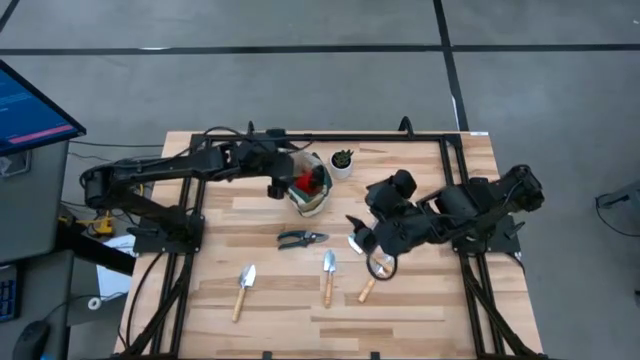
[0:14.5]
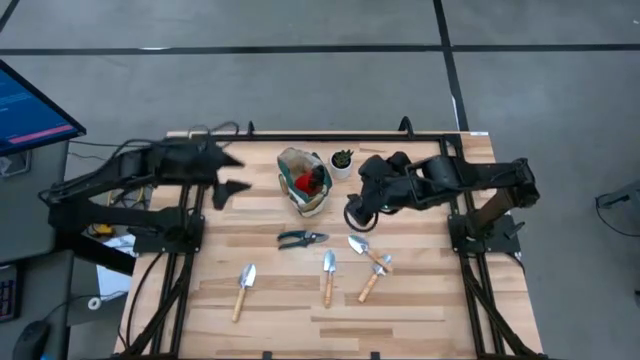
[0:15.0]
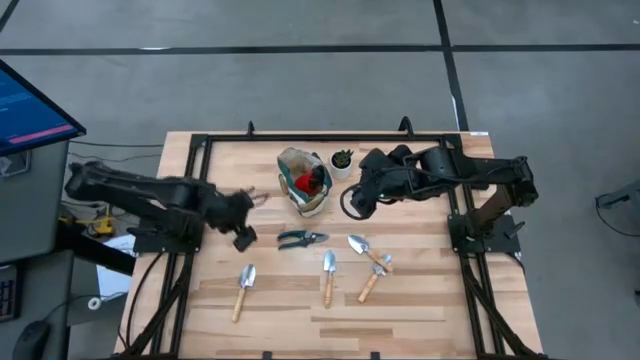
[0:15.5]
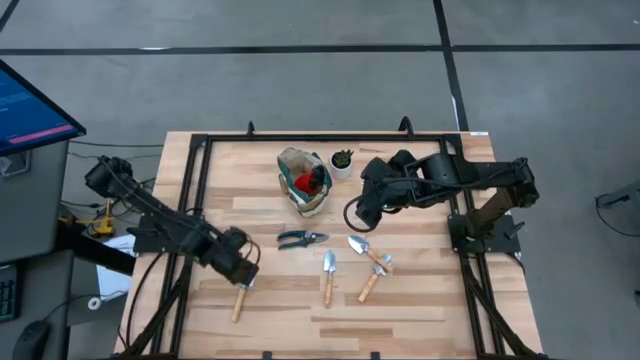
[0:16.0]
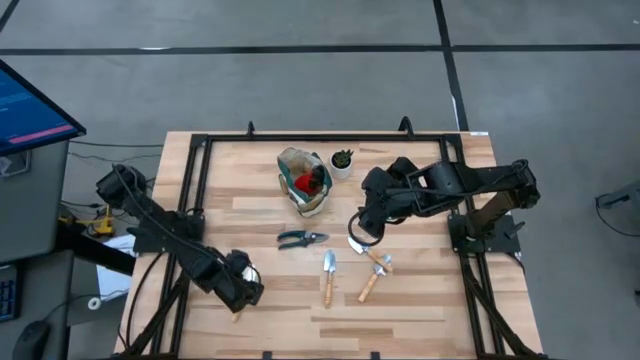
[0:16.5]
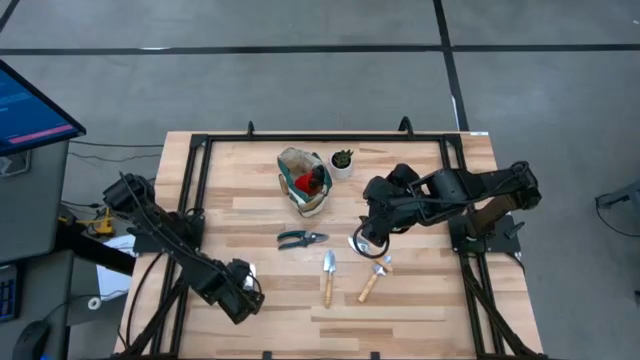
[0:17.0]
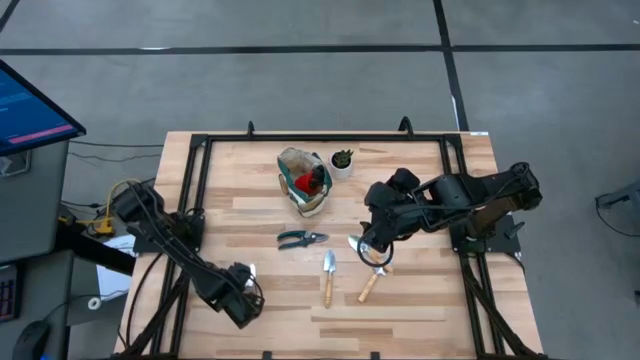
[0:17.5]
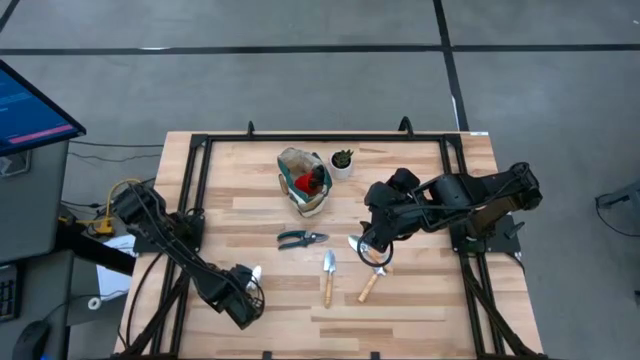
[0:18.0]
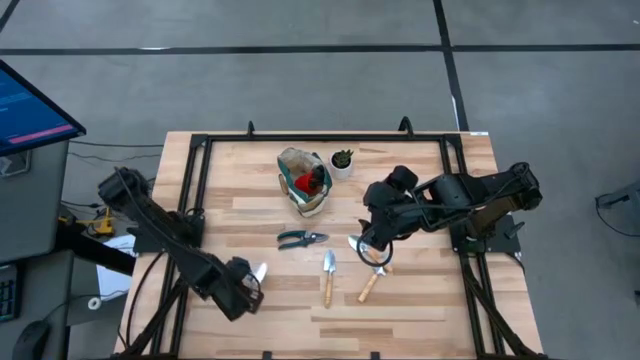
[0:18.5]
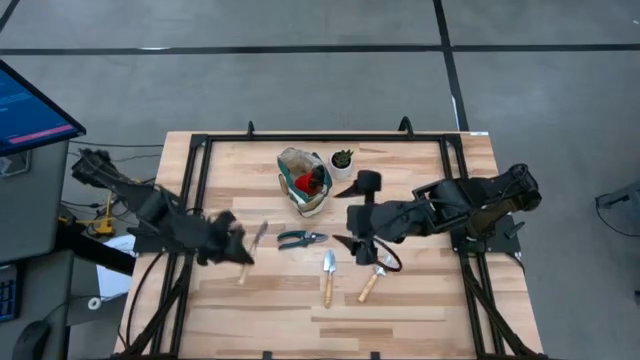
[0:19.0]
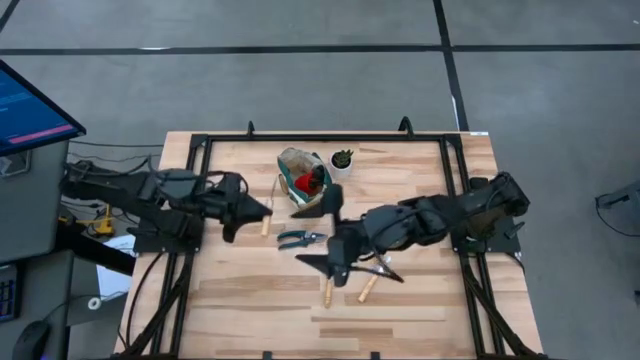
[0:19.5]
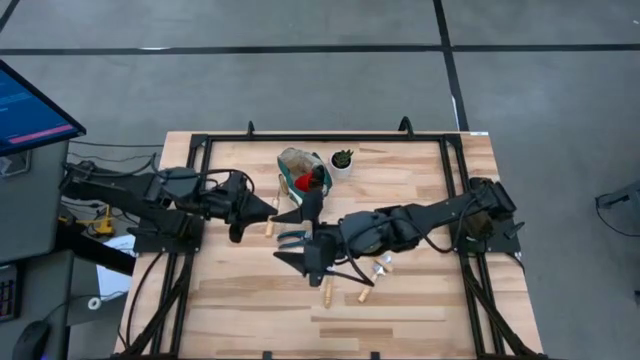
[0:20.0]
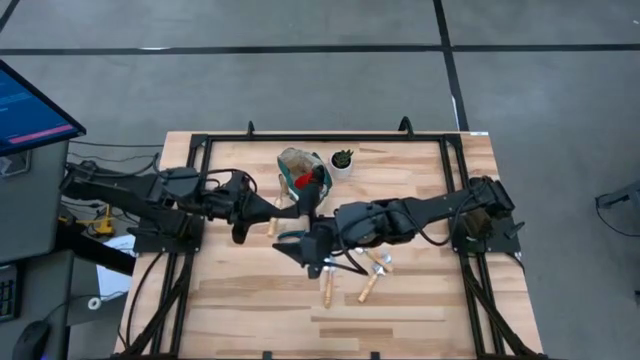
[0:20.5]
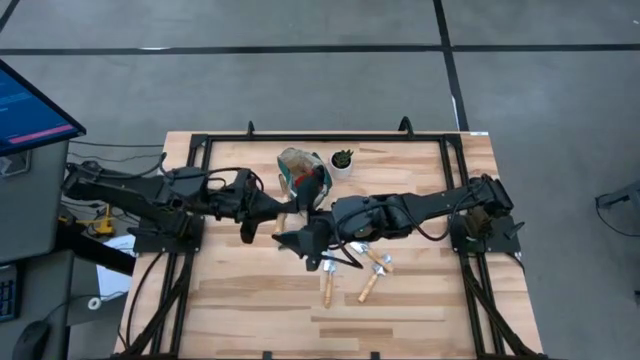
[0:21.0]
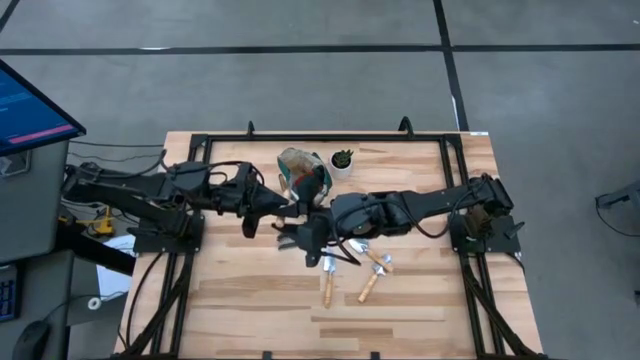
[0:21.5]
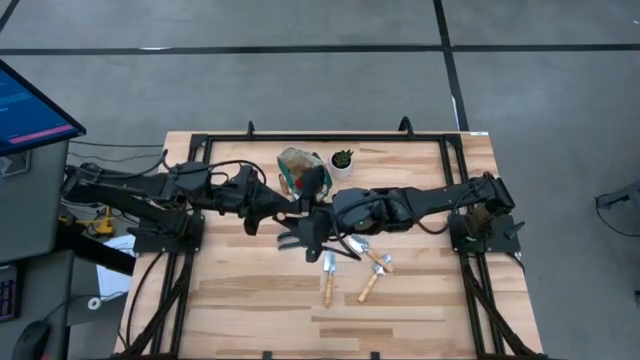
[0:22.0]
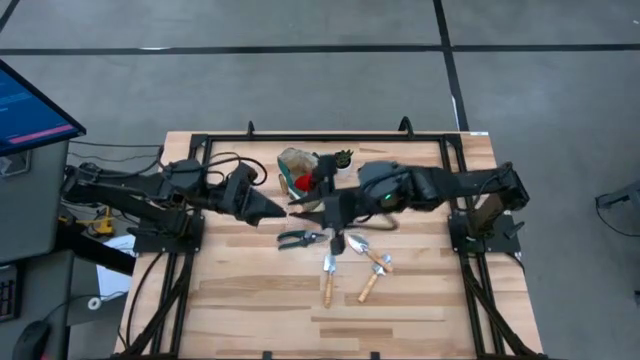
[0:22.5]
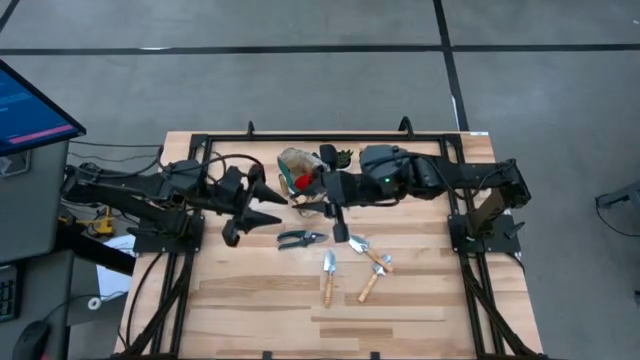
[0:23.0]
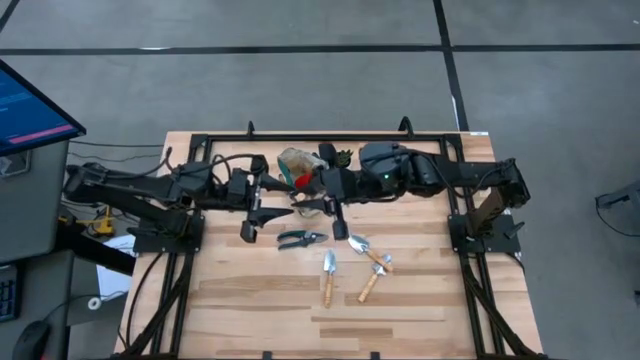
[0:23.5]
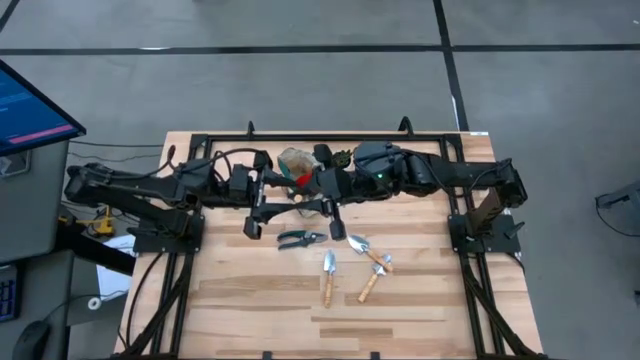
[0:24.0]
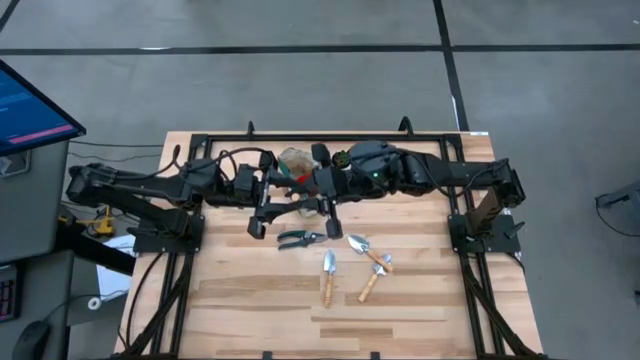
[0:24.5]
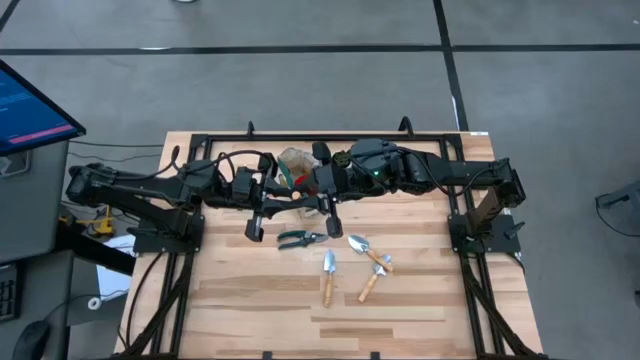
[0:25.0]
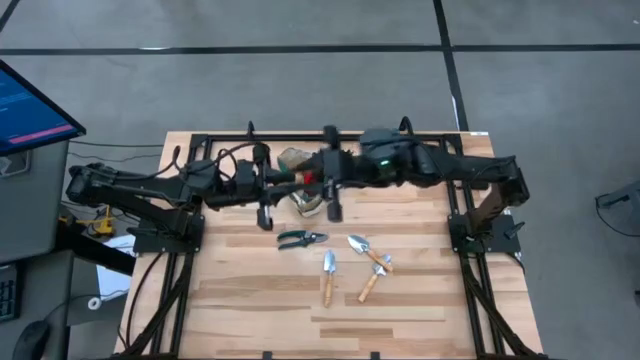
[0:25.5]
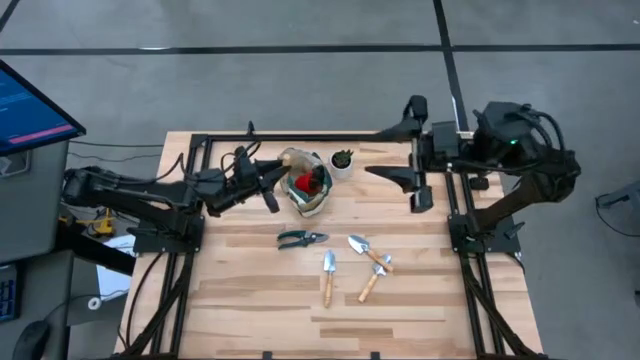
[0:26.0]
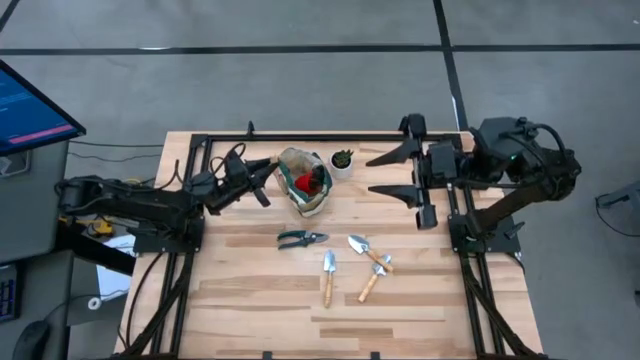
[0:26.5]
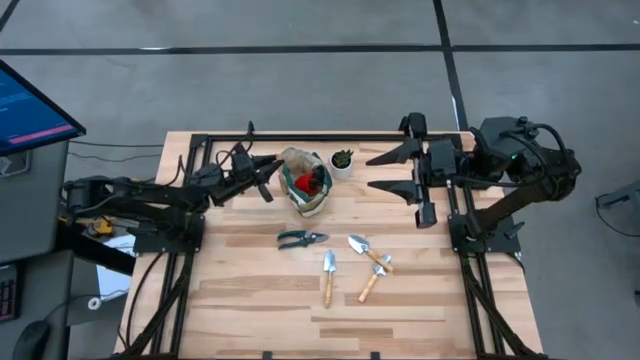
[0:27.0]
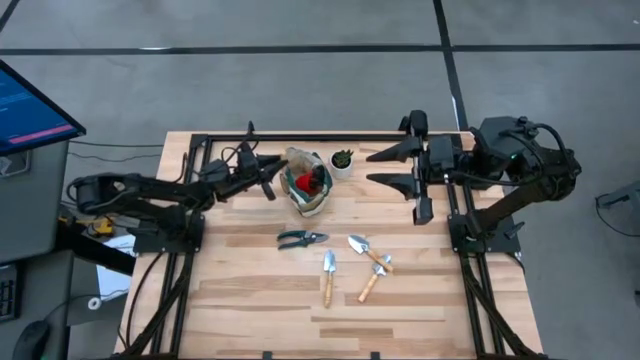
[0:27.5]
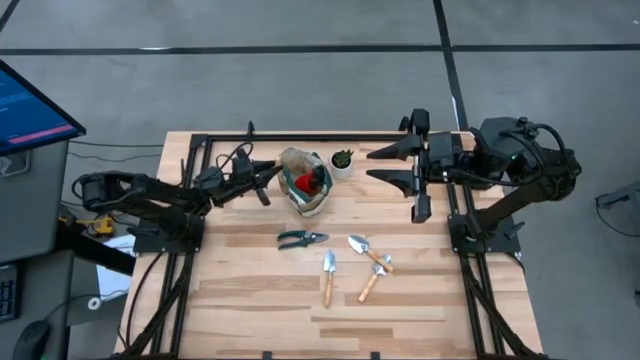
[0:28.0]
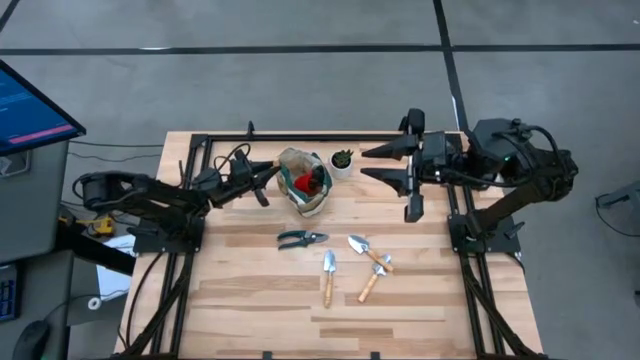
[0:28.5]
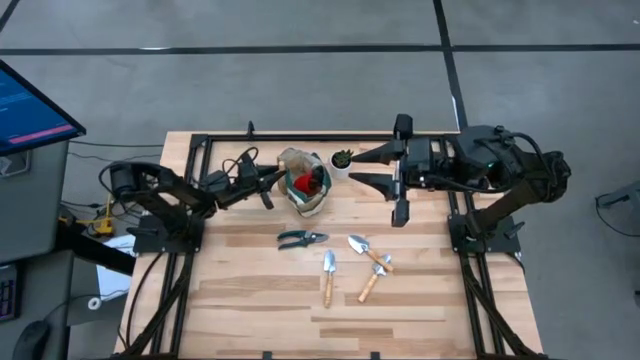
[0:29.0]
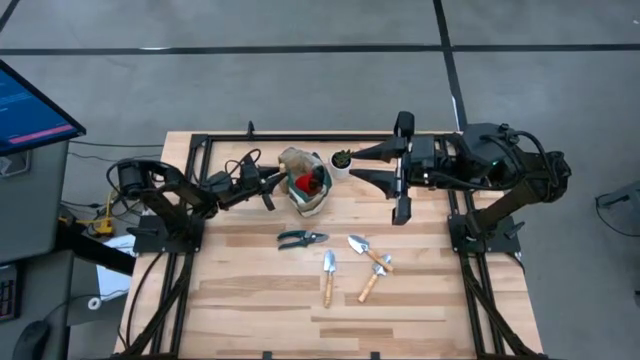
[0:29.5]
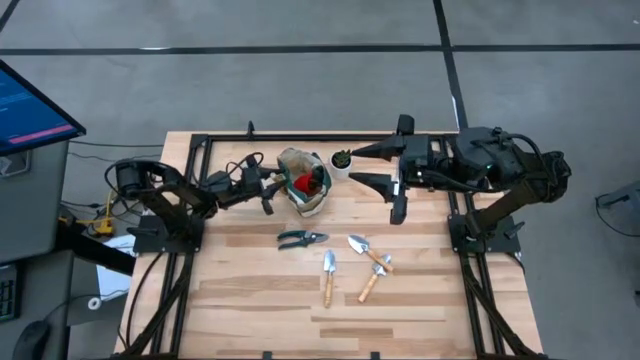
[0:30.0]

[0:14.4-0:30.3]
Task: Pick & Place Garden tools in Gardening bag
Put the light brown trowel into the pocket of the white gardening bag

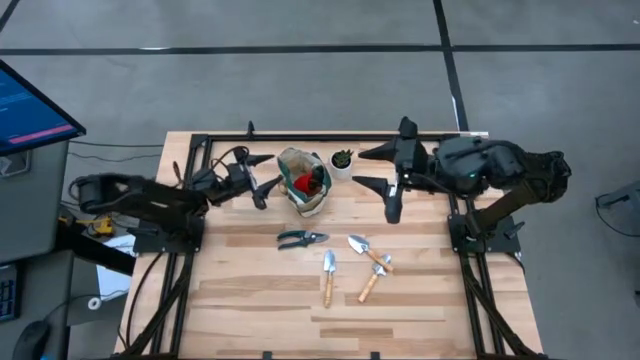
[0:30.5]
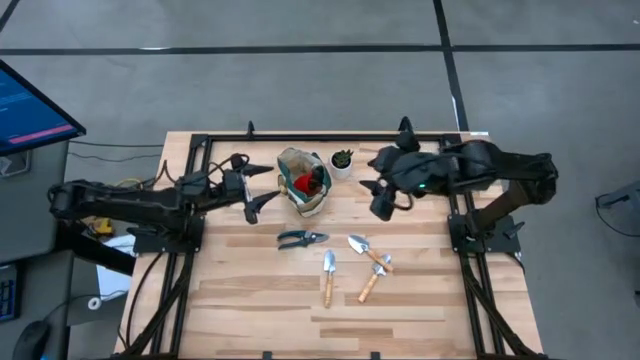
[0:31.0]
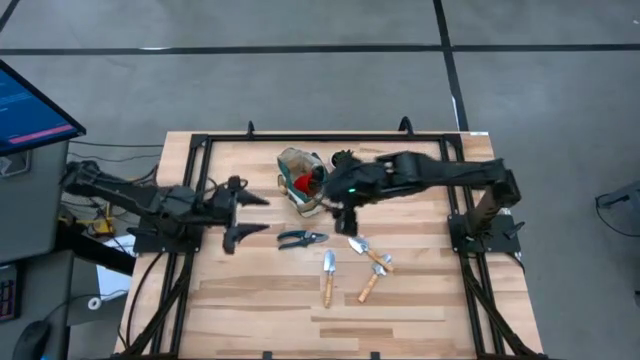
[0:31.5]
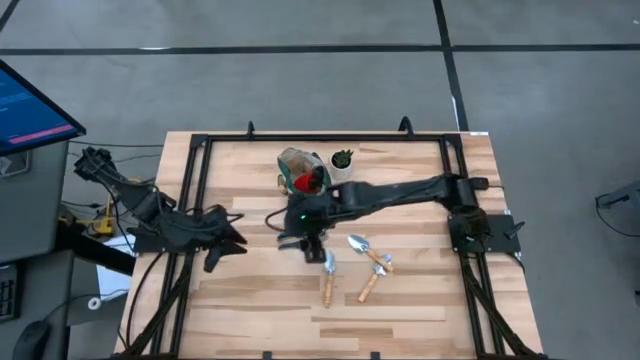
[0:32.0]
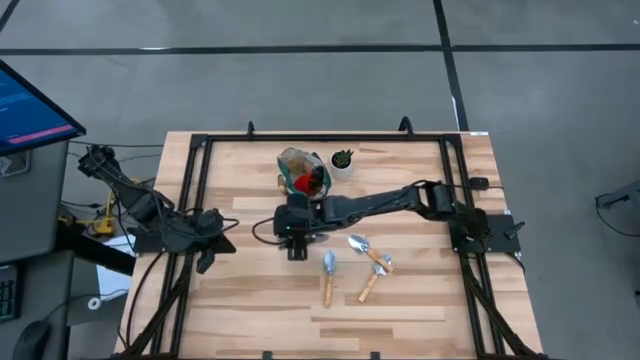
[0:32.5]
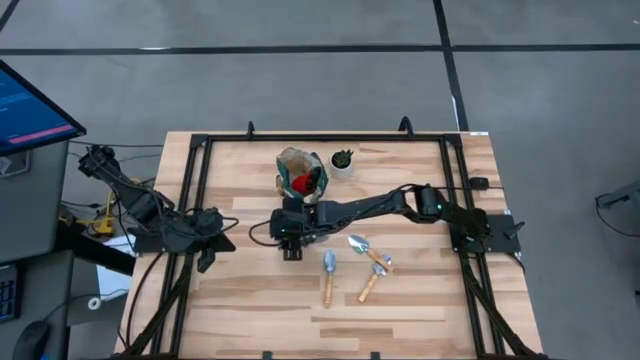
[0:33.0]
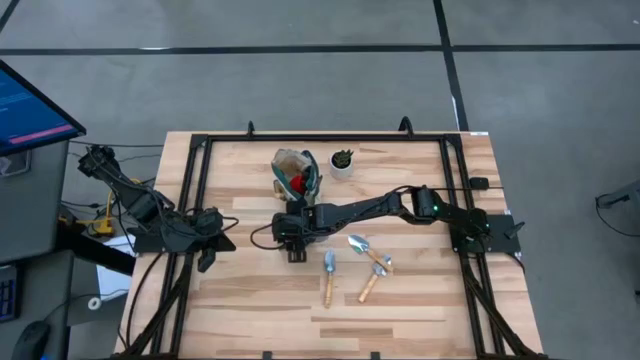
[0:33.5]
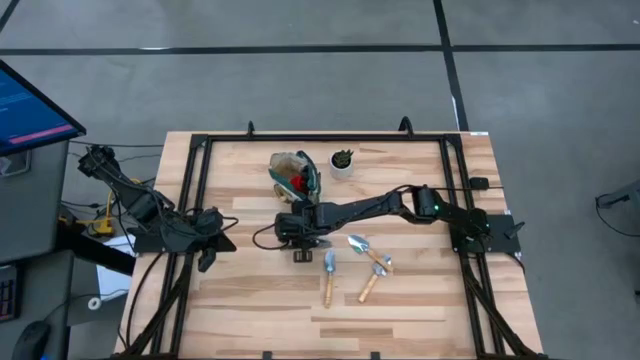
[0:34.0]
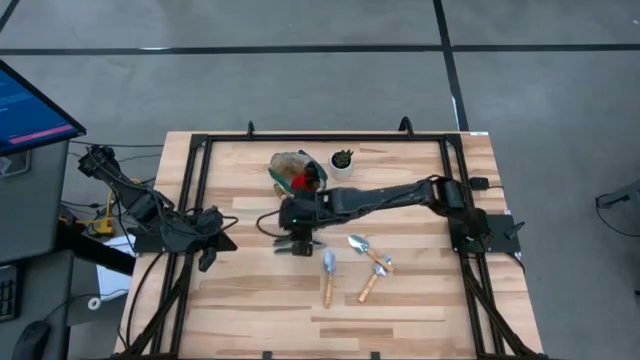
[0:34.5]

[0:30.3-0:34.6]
Put the green shear scissors into the pocket of the white gardening bag

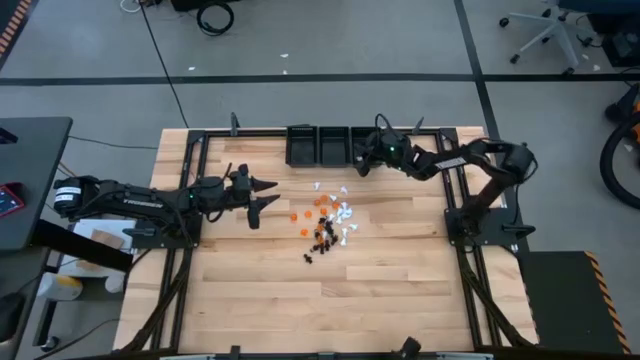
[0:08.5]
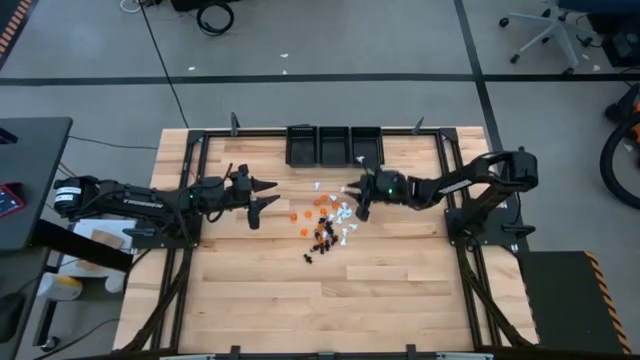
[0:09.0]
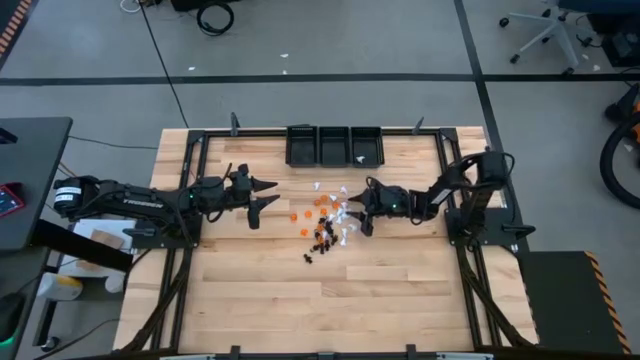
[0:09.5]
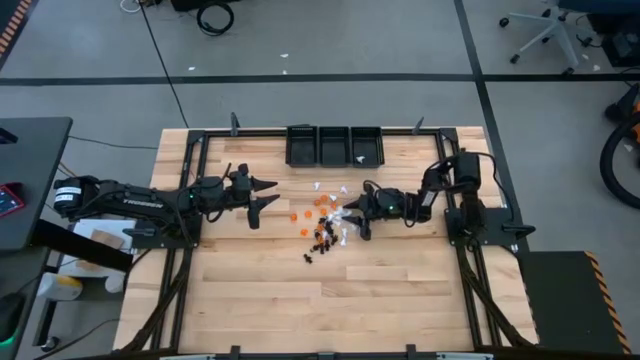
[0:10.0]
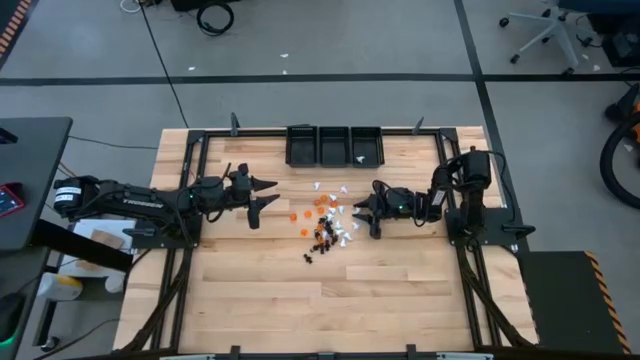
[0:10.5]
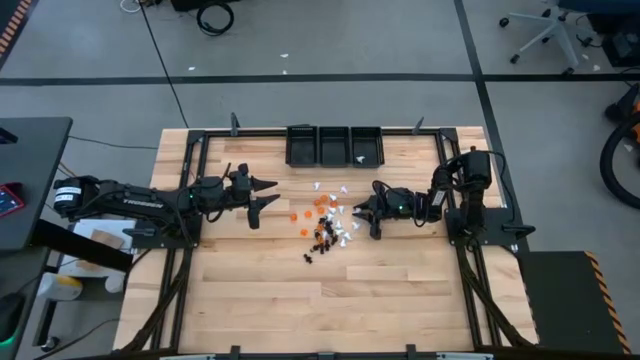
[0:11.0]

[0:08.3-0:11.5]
Task: Sort game pieces by color
Put the white game piece into the right black basket
